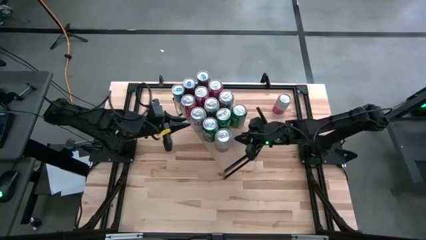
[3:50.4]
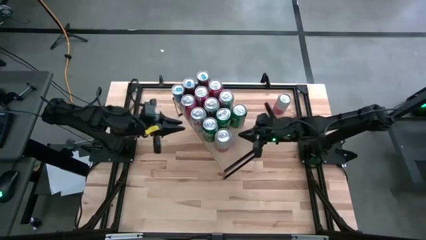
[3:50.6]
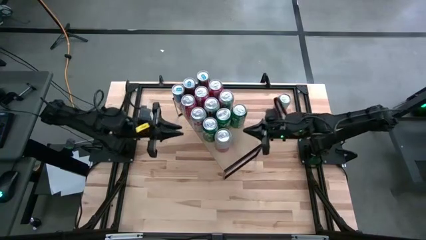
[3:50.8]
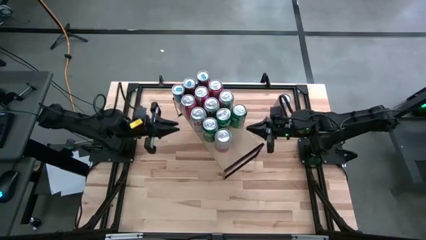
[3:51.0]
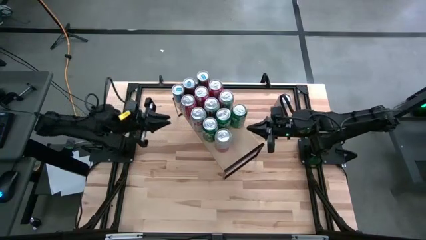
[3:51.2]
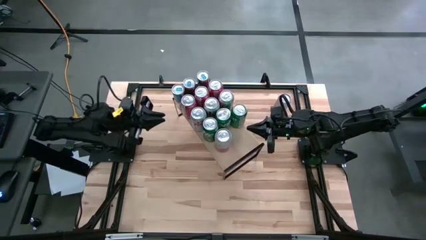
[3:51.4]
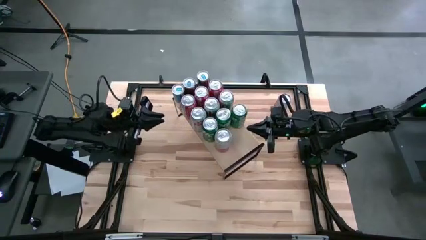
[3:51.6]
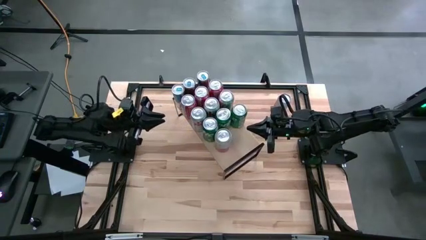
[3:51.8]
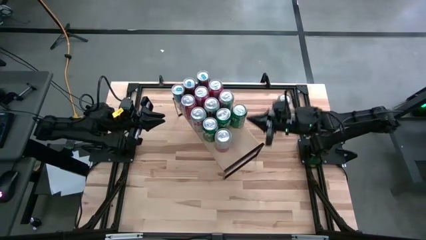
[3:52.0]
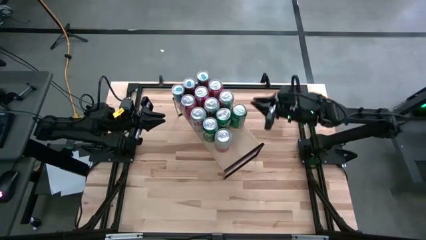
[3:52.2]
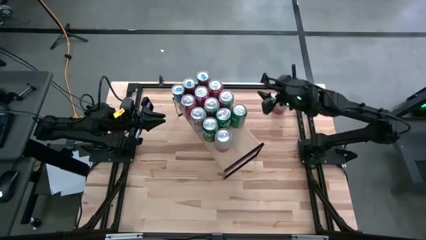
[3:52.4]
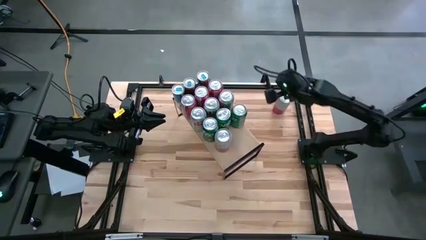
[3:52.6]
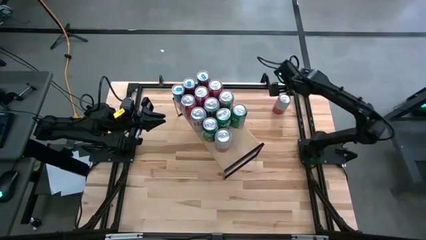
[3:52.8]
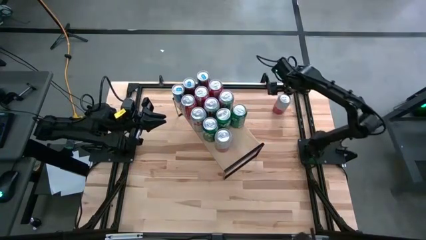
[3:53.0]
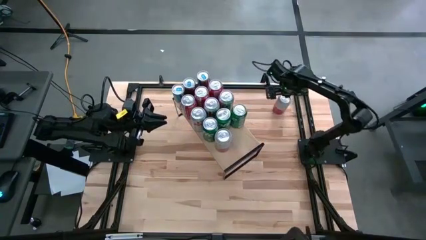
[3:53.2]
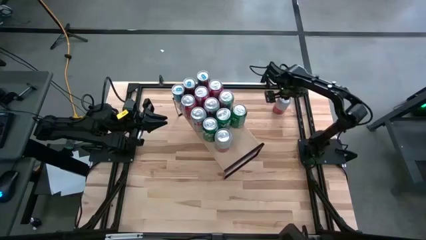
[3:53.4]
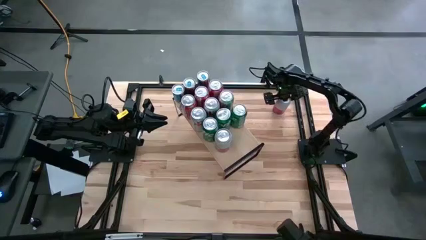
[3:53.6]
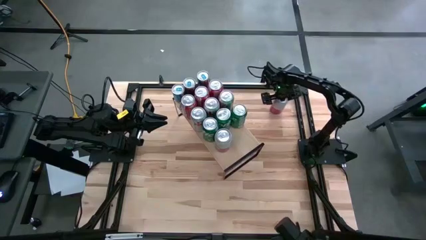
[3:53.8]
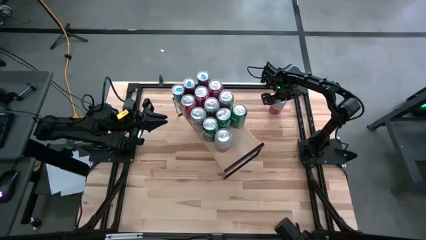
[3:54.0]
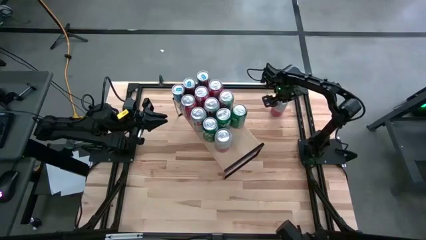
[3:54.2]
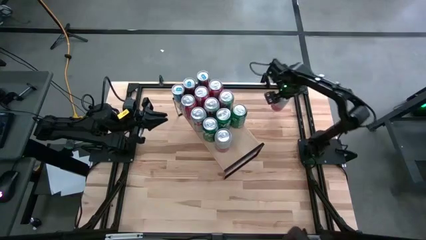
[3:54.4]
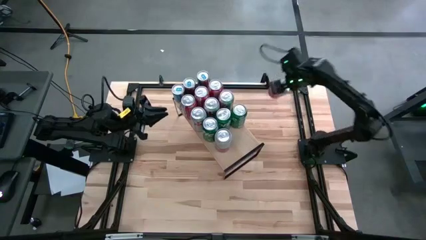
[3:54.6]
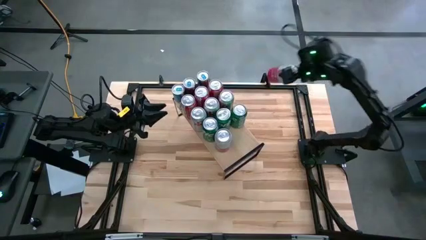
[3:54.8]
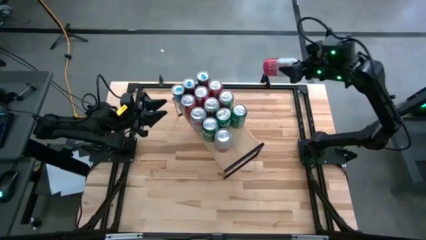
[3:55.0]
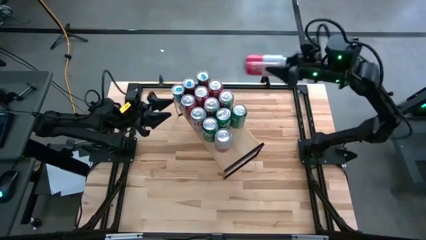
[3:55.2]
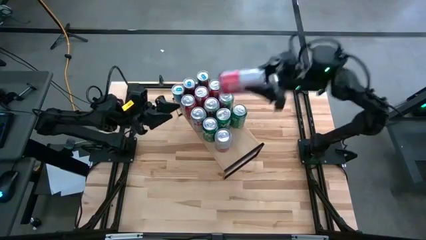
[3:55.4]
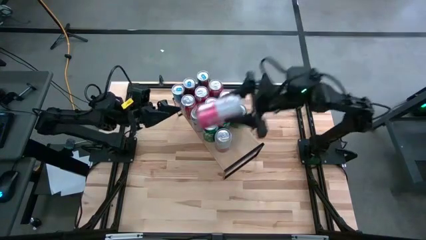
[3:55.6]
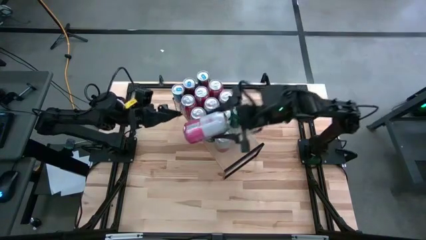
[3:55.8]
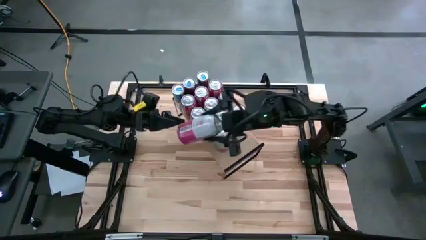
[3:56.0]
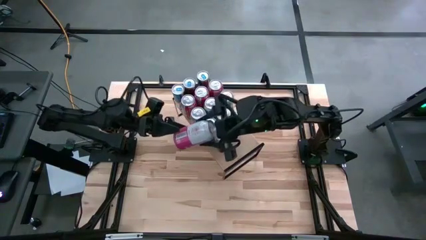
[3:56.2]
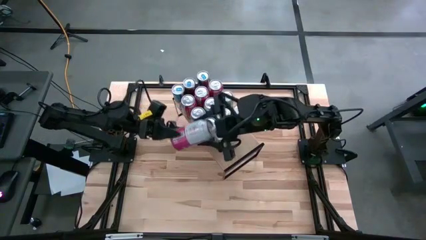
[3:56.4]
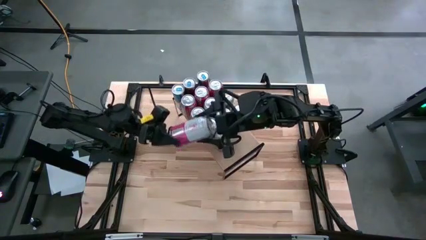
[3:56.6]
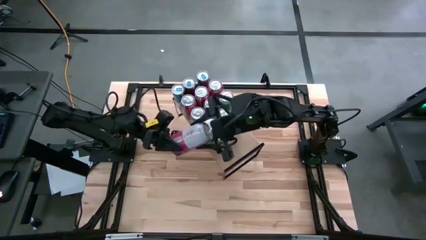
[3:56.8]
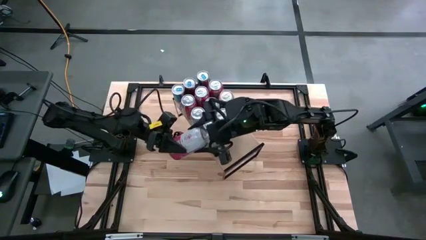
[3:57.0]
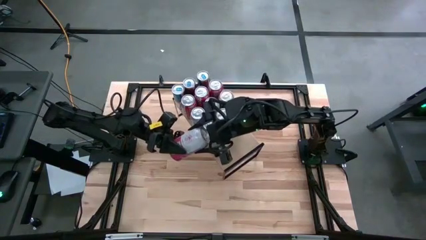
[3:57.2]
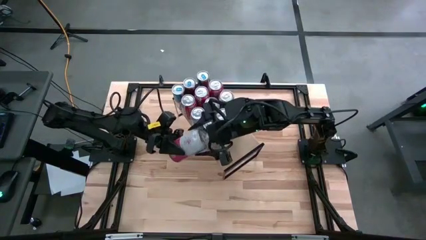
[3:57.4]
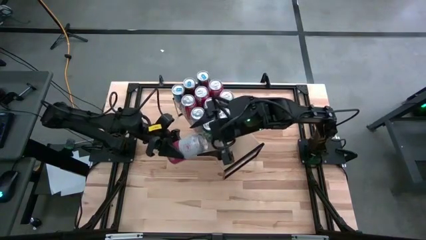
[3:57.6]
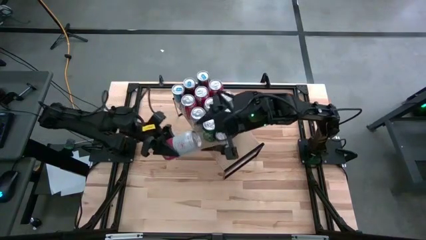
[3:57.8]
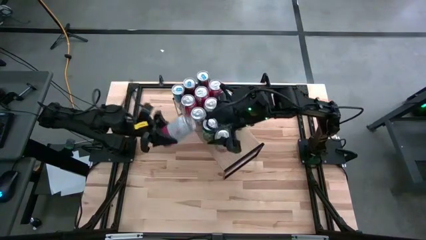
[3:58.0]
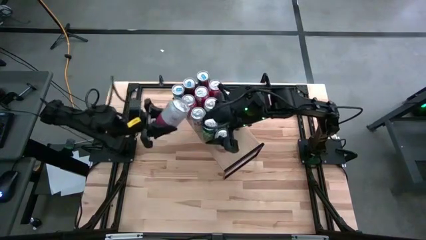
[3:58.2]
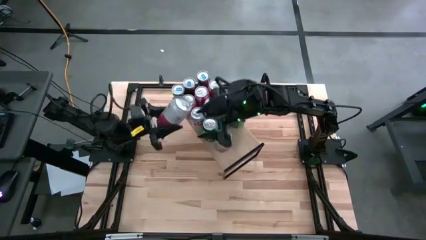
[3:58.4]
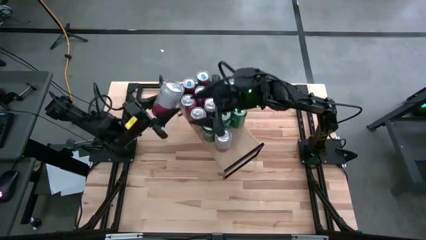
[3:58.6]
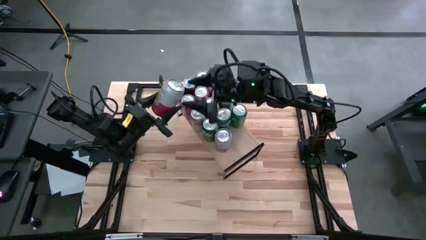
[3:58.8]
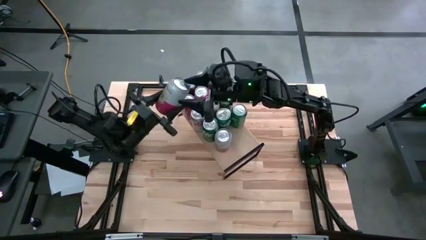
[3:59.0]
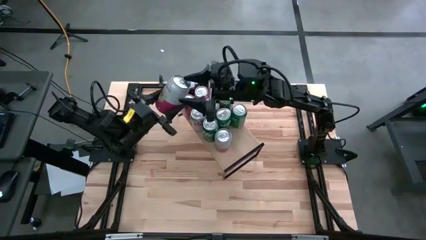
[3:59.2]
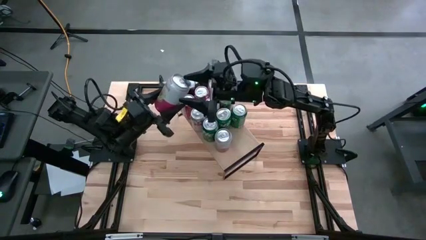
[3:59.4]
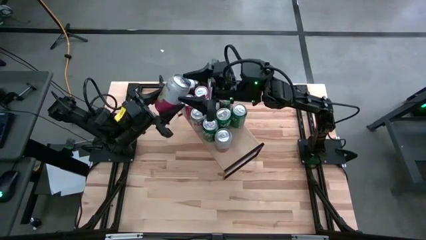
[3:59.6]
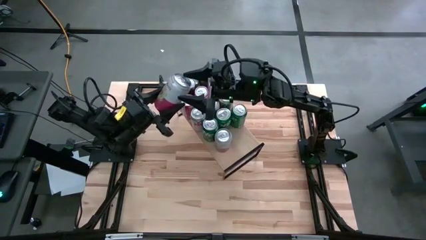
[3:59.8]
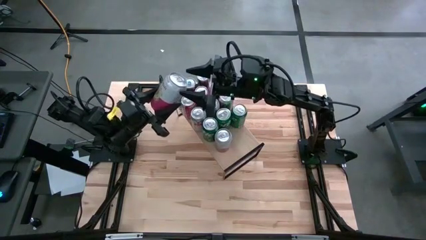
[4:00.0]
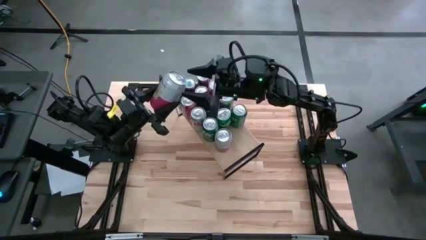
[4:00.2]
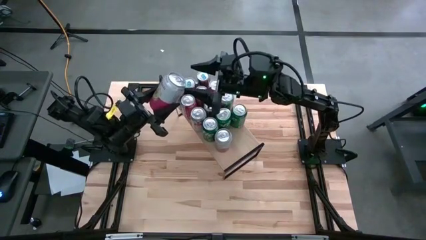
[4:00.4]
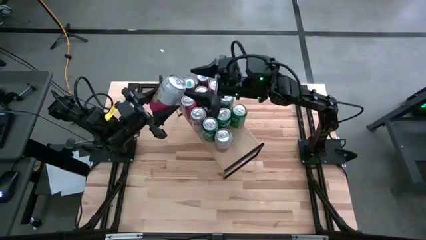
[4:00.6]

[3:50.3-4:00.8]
Task: Place canned beverage on shelf
Put the pink soda can on the shelf aligned with the other pink soda can
